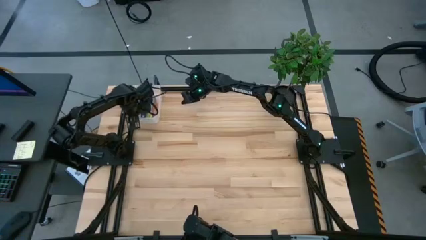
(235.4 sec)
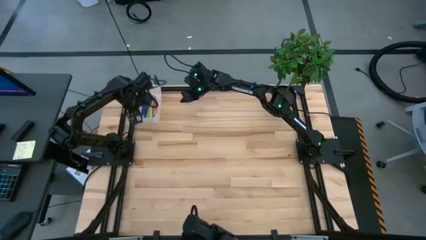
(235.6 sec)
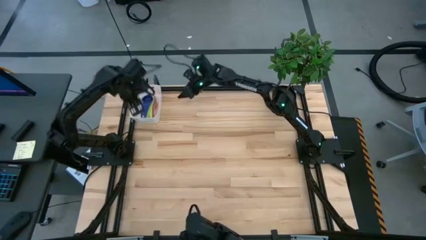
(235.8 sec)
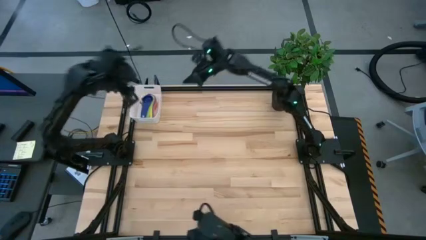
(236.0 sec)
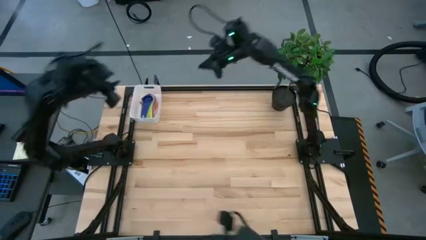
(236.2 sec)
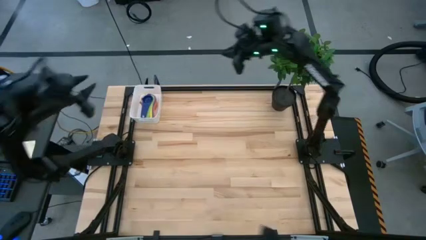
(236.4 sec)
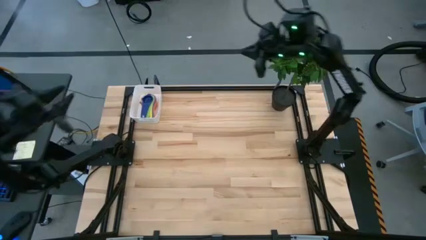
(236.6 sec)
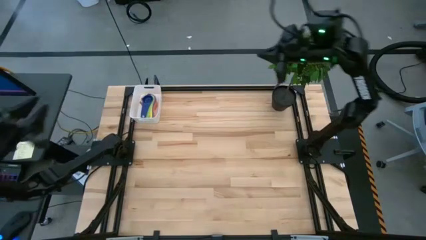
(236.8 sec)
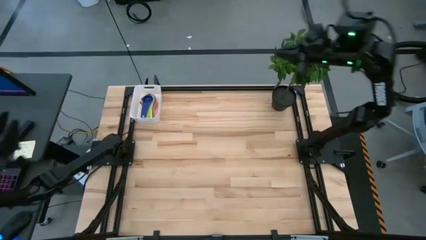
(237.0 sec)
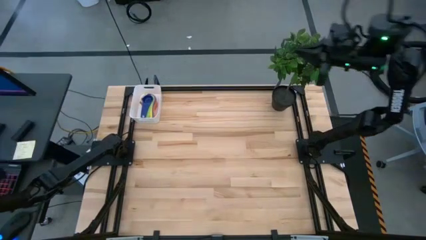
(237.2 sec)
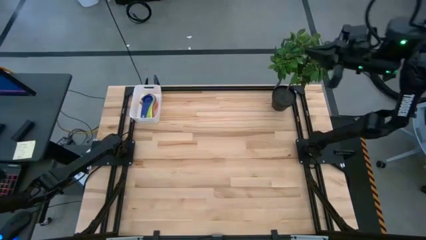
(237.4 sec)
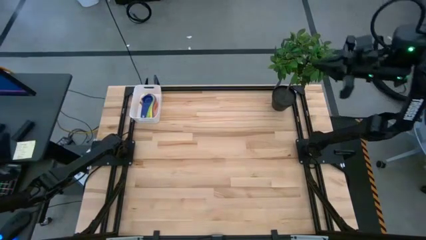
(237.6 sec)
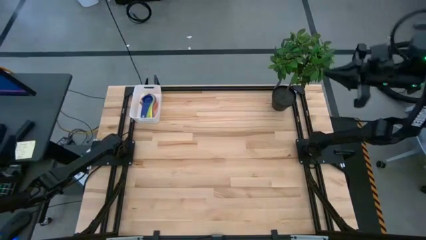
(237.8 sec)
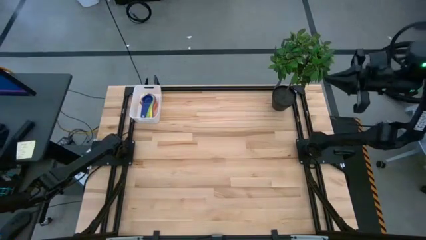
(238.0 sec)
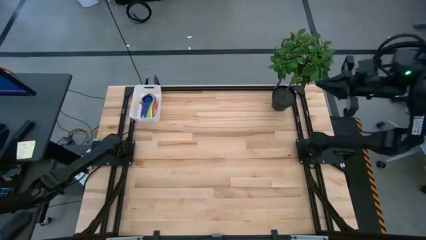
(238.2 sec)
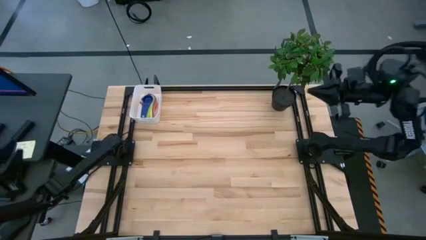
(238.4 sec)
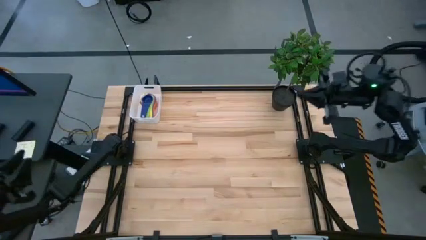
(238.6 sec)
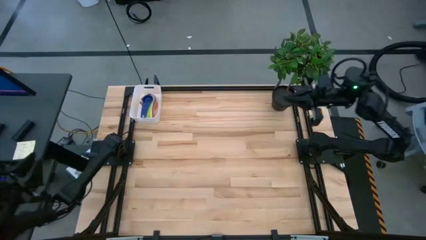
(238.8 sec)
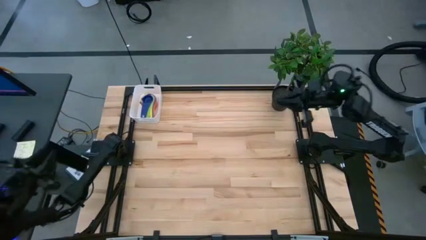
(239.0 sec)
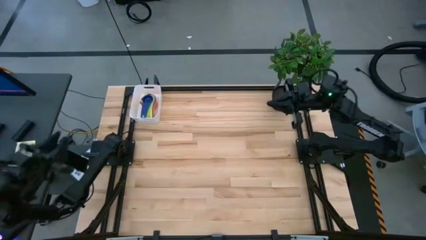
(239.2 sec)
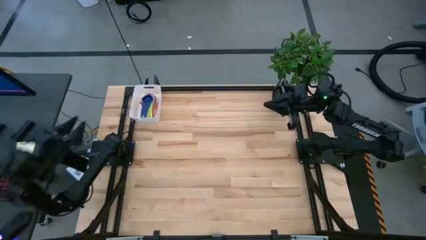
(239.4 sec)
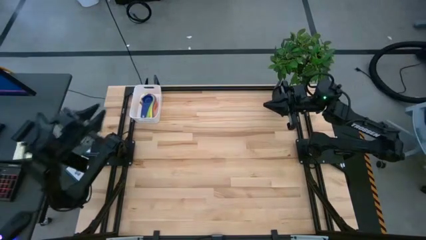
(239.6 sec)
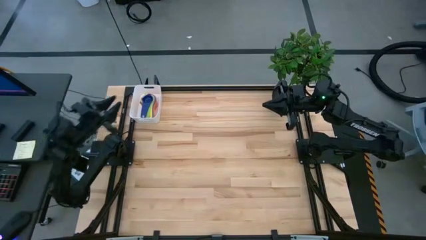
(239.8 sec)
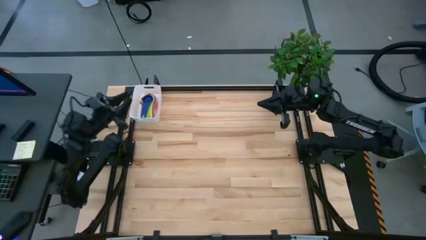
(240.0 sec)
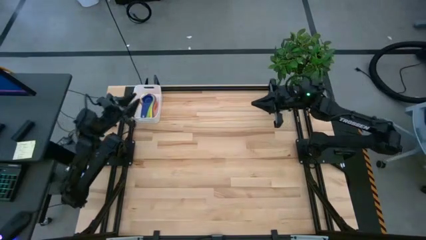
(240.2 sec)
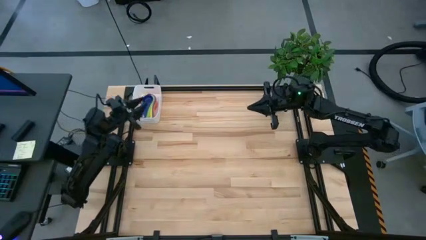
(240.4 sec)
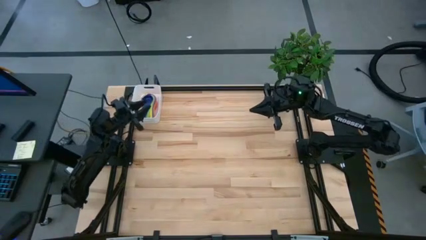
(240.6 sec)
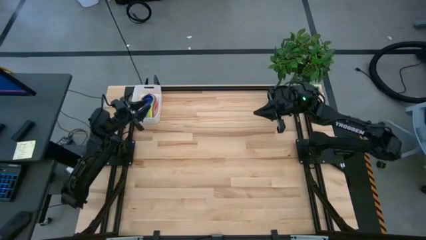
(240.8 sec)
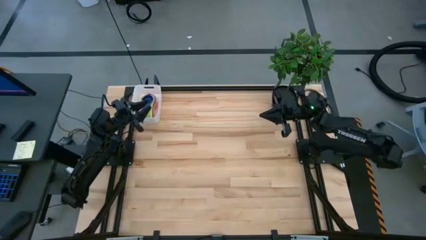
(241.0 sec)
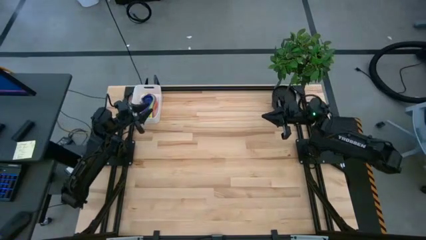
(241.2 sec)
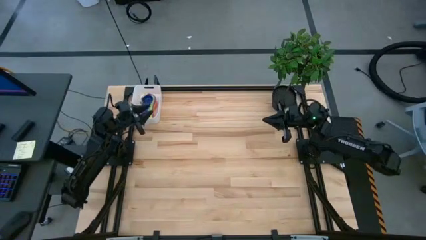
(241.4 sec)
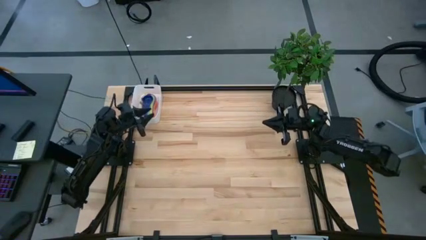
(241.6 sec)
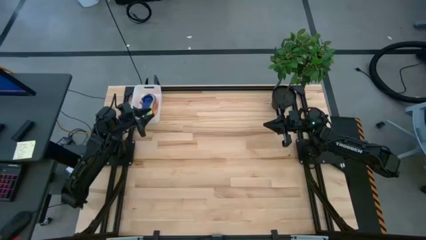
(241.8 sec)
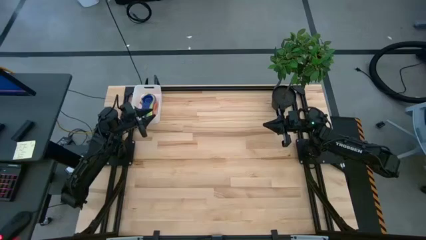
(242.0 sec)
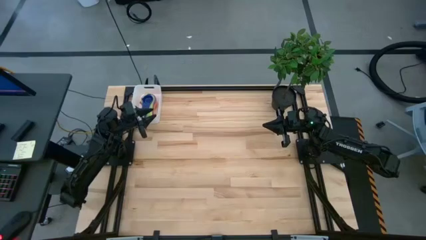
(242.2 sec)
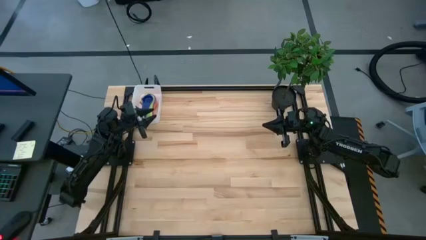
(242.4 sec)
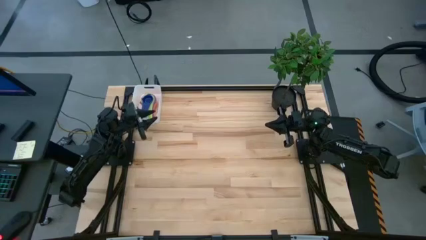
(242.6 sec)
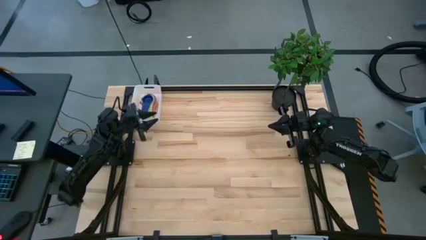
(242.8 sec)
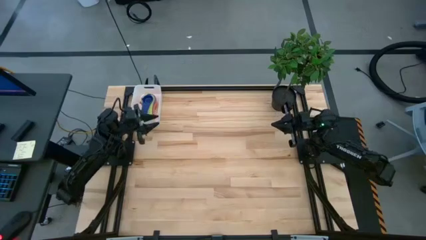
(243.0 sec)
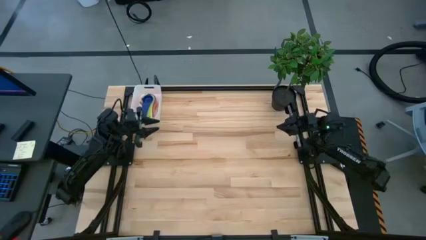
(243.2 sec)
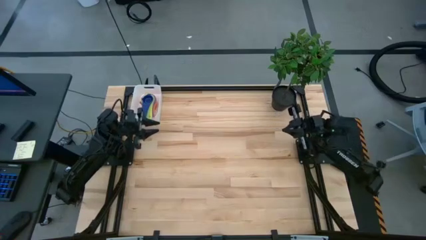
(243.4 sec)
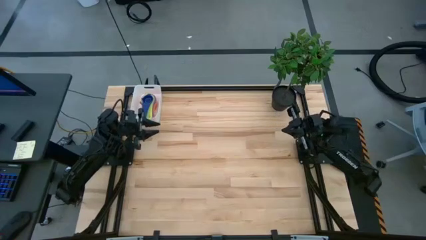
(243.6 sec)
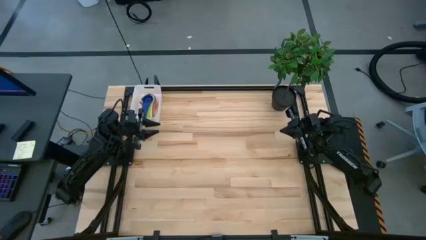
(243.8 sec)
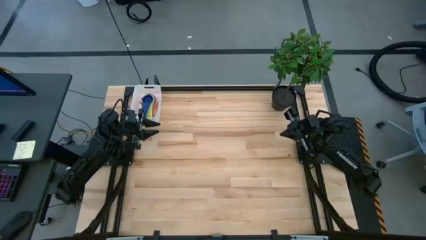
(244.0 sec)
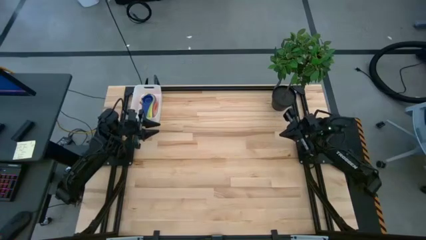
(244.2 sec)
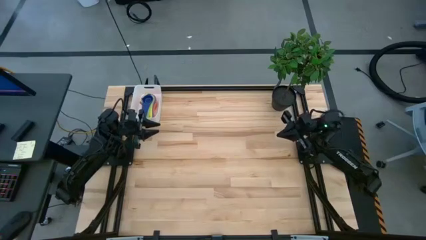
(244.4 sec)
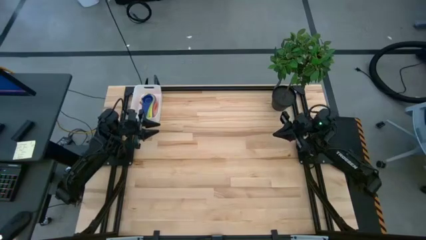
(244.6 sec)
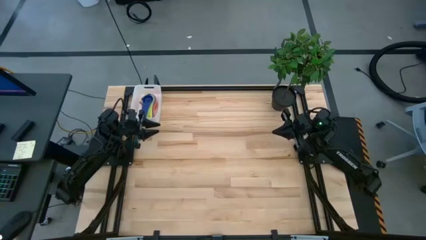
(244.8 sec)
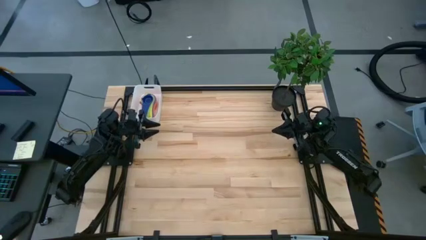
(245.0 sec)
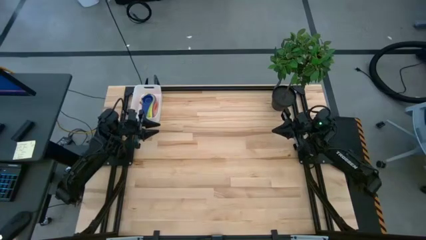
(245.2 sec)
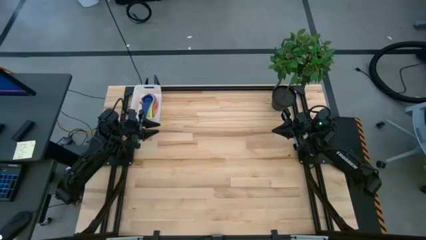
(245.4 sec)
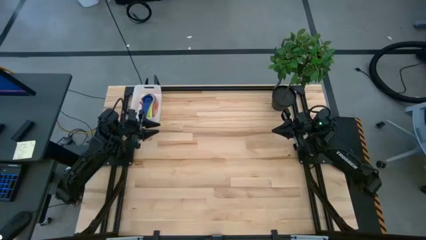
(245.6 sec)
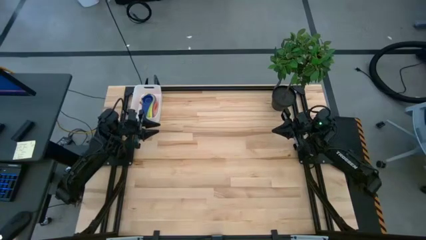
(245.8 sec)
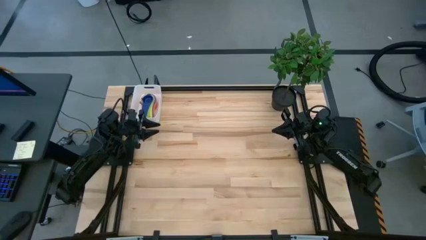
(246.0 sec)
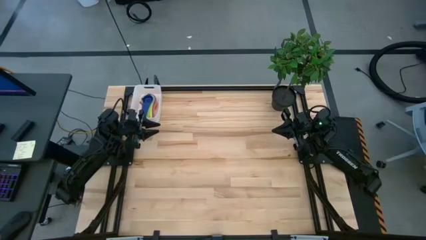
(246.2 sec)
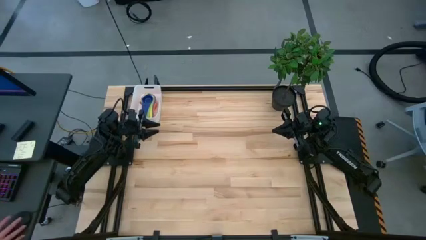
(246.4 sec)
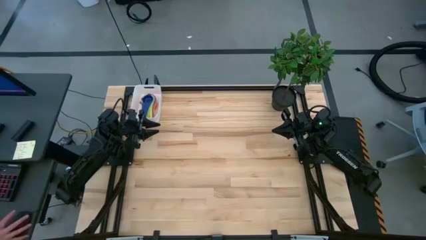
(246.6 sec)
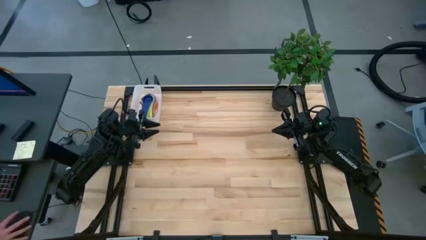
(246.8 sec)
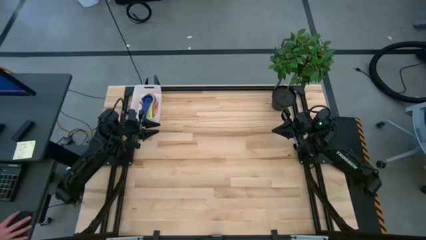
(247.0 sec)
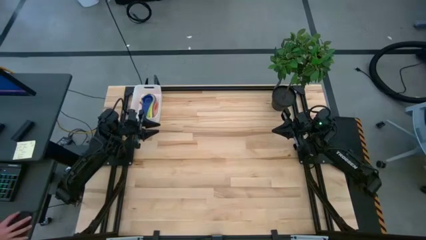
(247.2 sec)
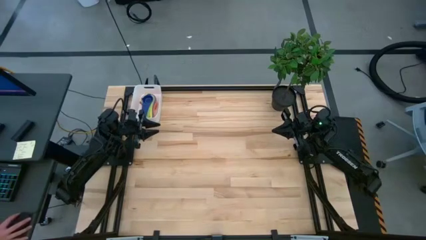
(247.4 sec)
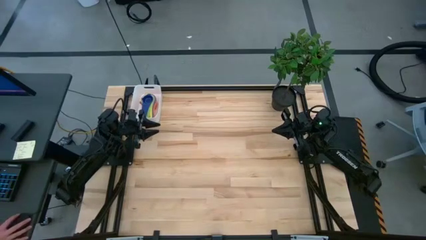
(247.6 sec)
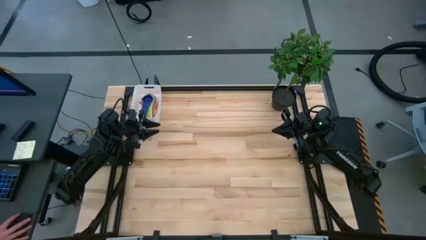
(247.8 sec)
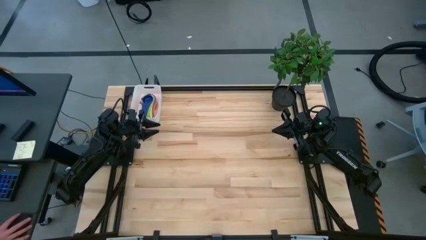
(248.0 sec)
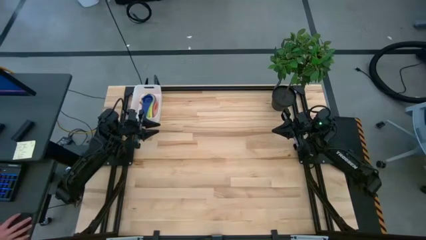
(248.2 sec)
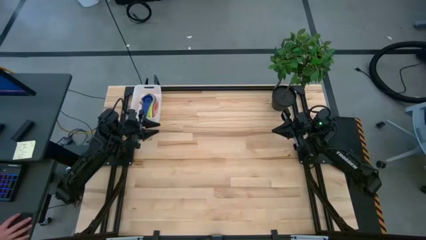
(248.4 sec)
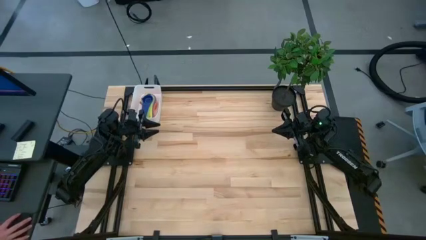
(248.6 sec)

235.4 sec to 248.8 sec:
Task: Nest measuring cups in basket
Return to Home Position
